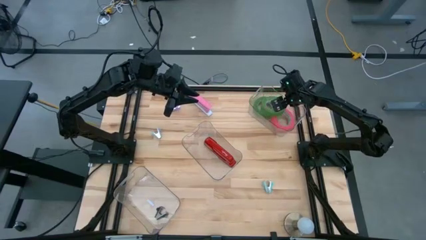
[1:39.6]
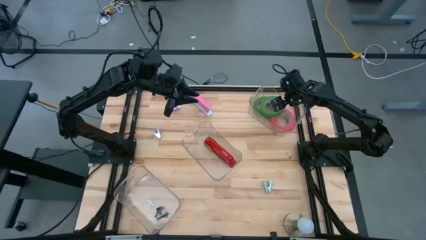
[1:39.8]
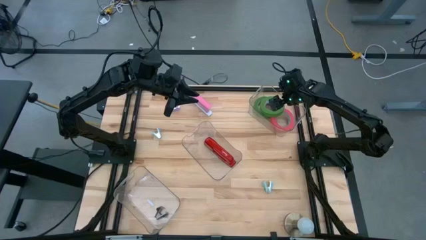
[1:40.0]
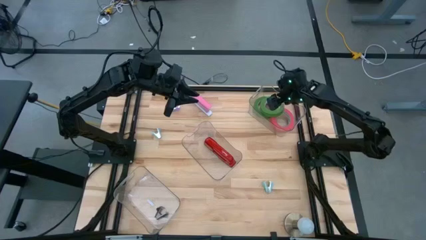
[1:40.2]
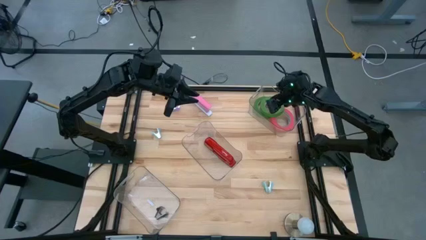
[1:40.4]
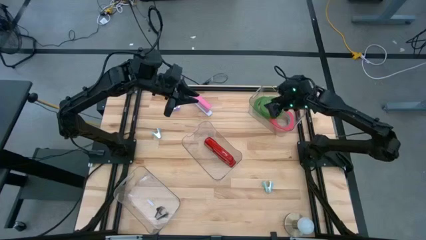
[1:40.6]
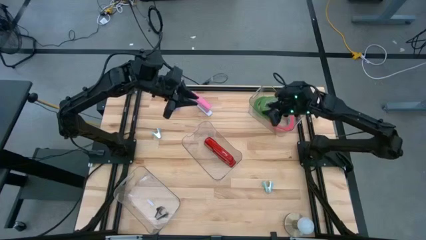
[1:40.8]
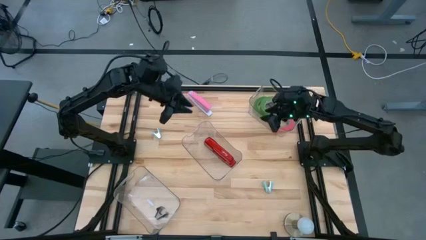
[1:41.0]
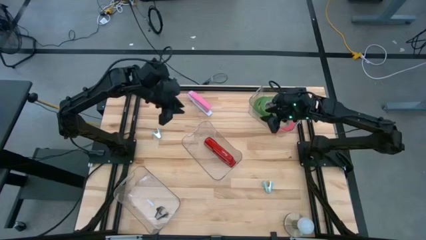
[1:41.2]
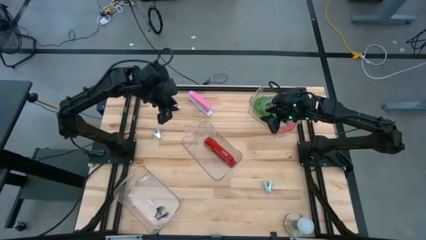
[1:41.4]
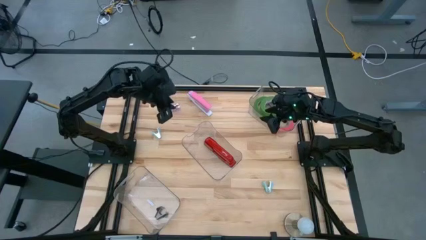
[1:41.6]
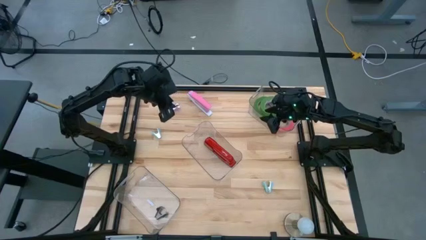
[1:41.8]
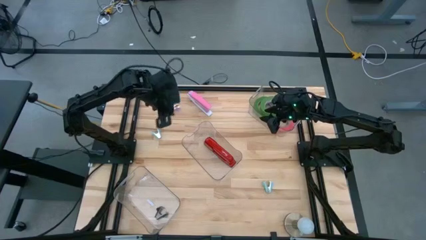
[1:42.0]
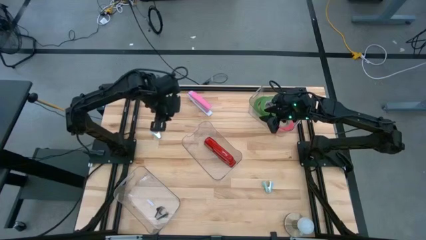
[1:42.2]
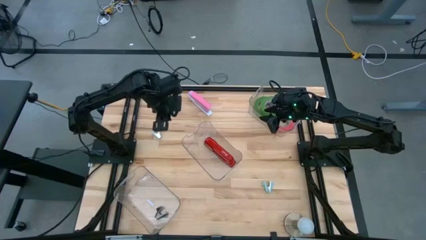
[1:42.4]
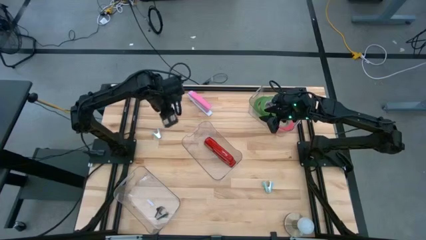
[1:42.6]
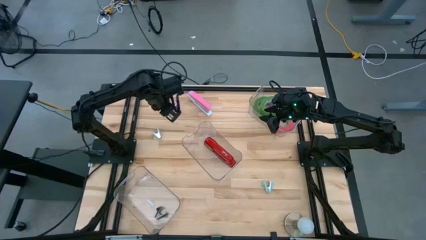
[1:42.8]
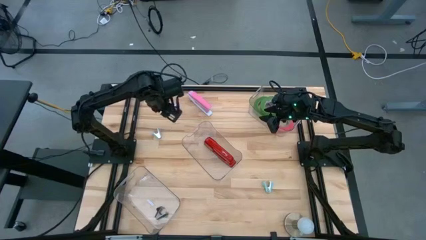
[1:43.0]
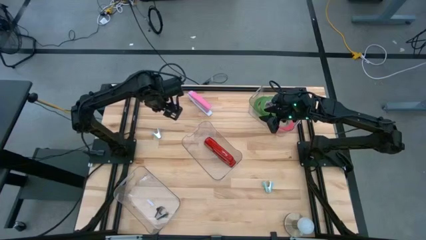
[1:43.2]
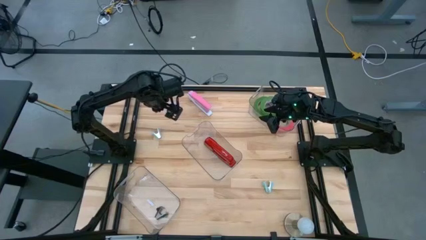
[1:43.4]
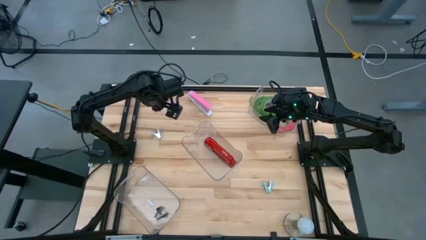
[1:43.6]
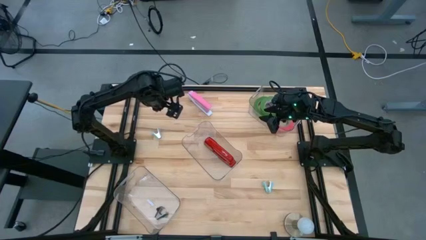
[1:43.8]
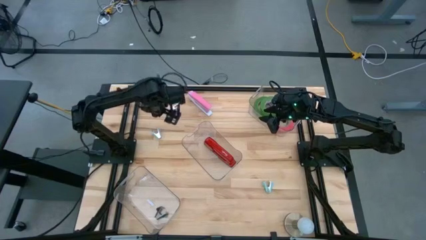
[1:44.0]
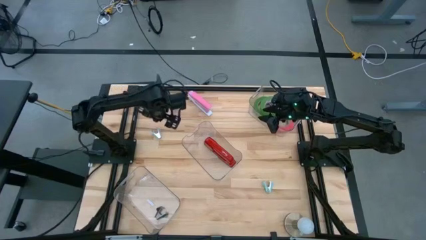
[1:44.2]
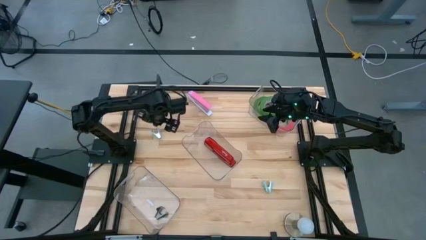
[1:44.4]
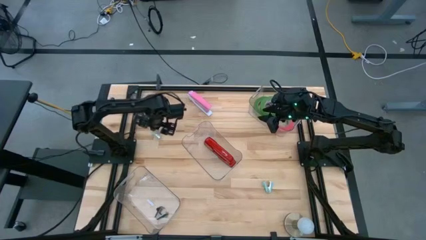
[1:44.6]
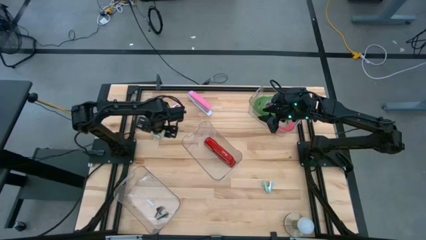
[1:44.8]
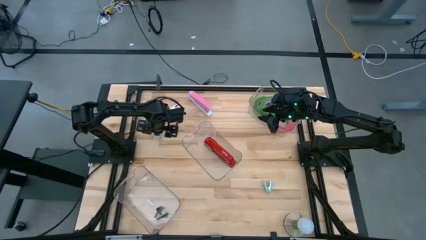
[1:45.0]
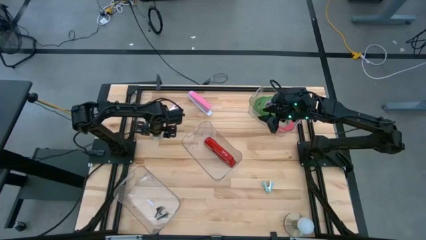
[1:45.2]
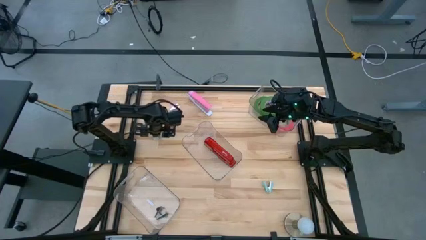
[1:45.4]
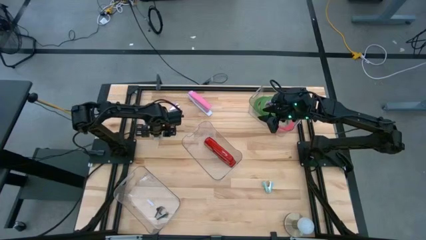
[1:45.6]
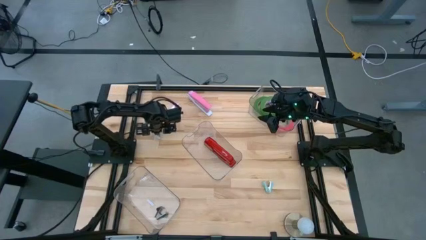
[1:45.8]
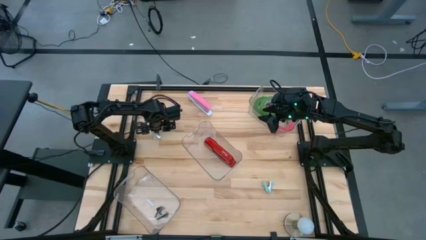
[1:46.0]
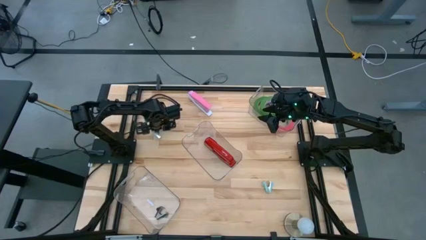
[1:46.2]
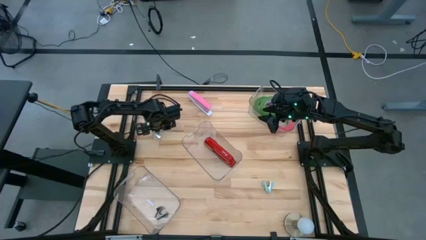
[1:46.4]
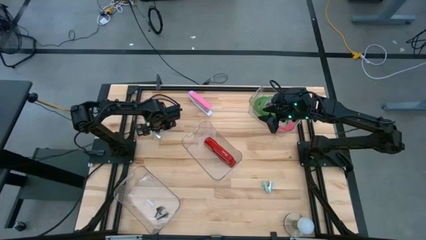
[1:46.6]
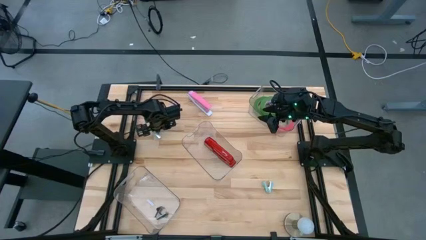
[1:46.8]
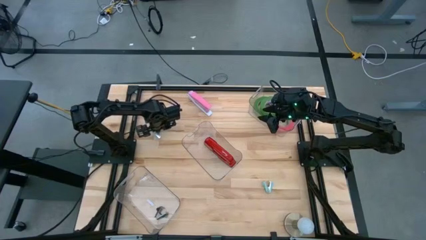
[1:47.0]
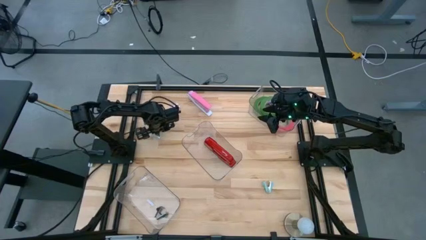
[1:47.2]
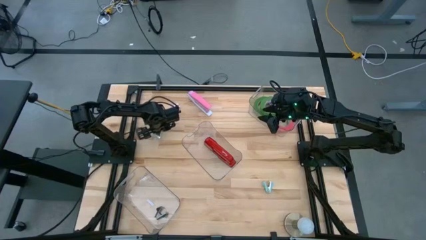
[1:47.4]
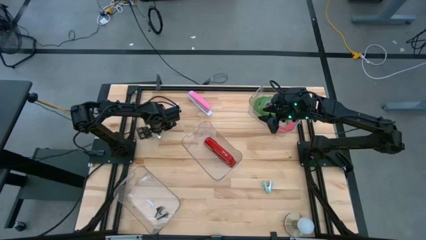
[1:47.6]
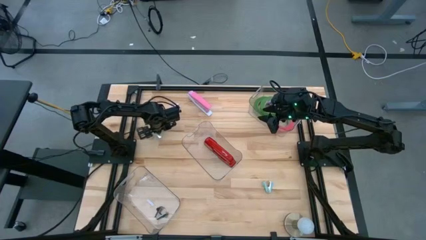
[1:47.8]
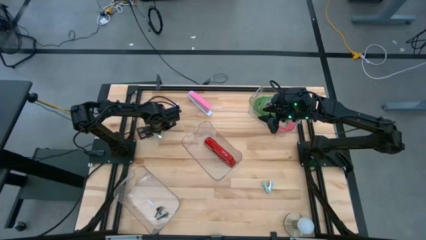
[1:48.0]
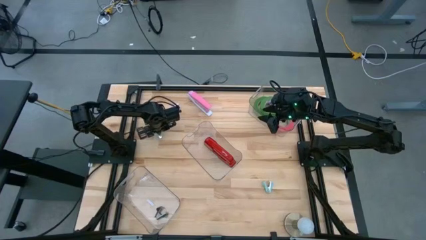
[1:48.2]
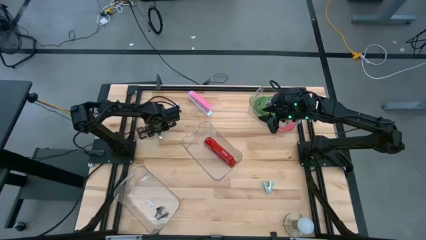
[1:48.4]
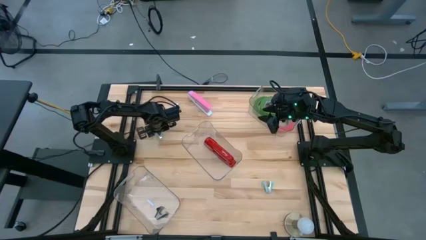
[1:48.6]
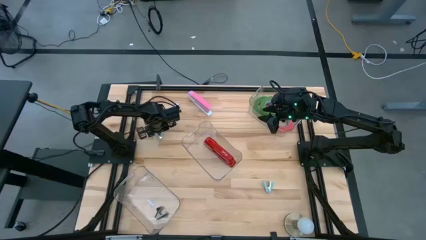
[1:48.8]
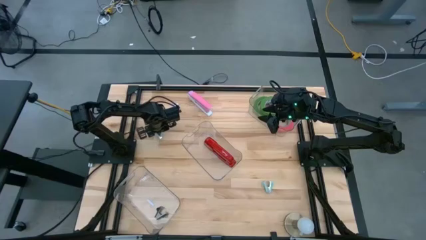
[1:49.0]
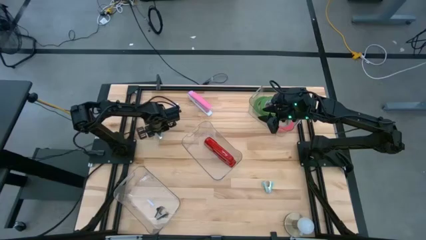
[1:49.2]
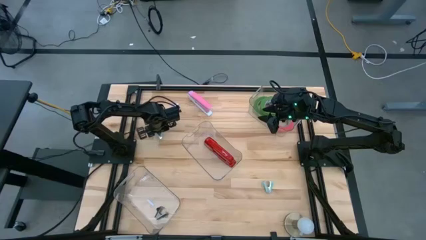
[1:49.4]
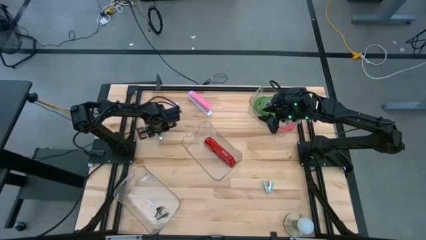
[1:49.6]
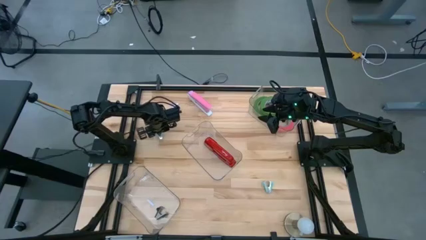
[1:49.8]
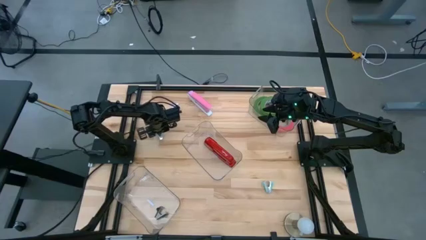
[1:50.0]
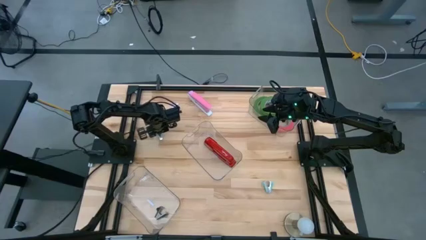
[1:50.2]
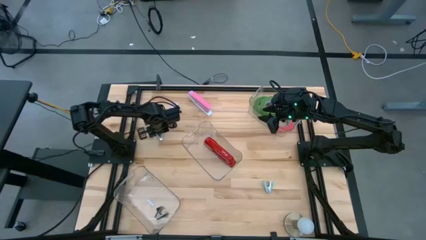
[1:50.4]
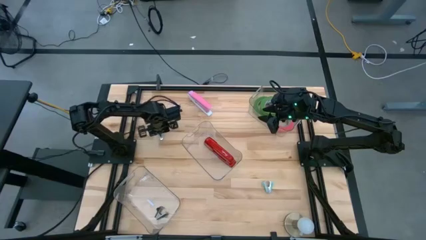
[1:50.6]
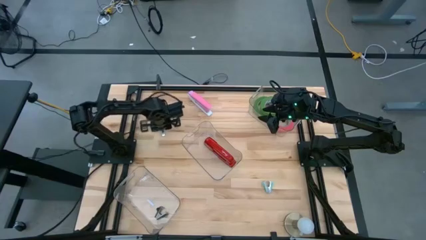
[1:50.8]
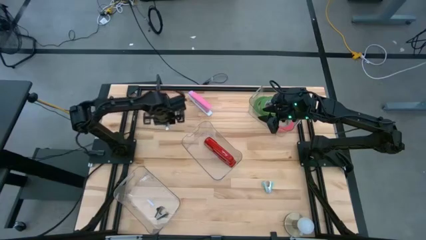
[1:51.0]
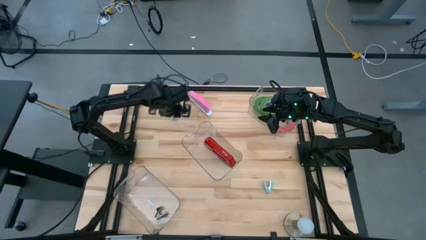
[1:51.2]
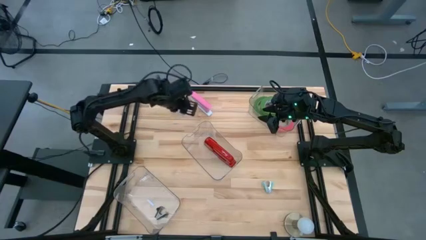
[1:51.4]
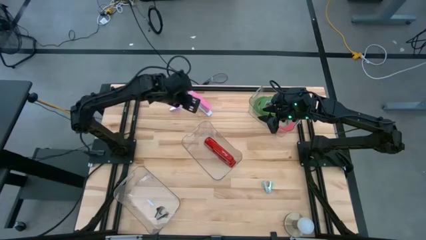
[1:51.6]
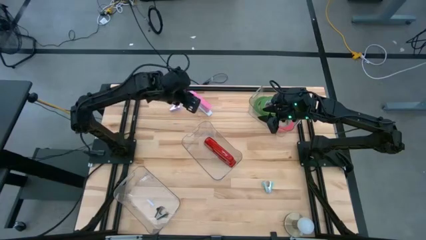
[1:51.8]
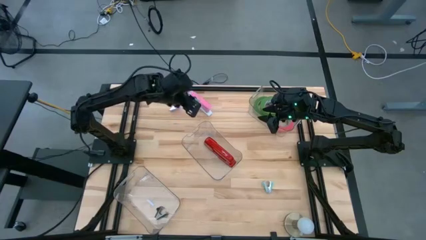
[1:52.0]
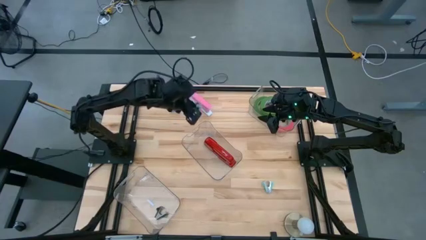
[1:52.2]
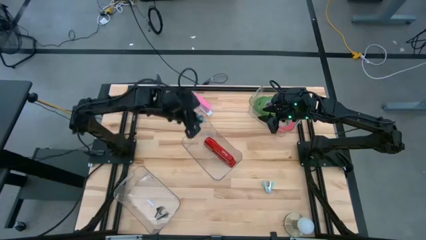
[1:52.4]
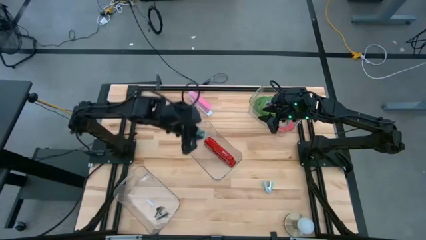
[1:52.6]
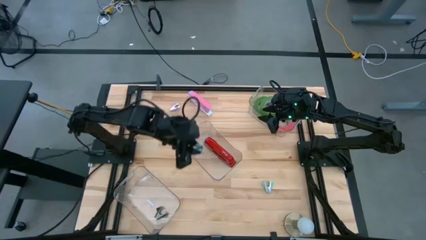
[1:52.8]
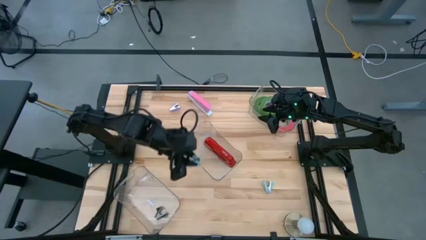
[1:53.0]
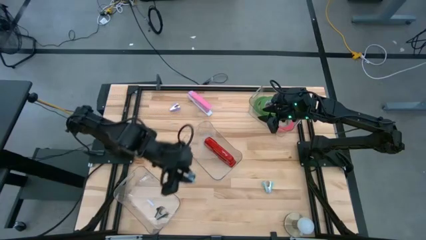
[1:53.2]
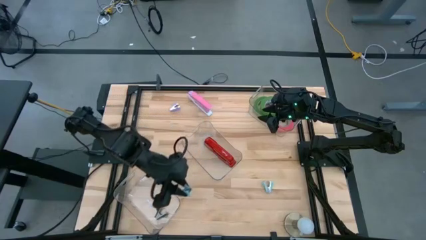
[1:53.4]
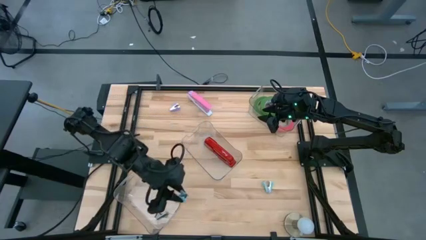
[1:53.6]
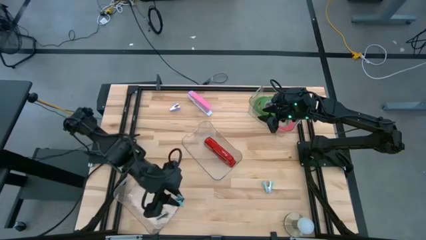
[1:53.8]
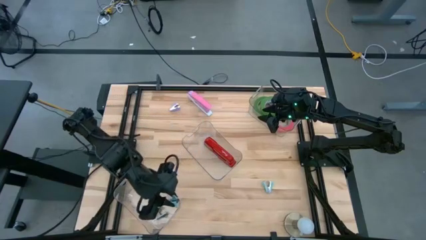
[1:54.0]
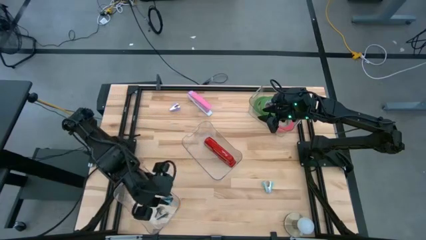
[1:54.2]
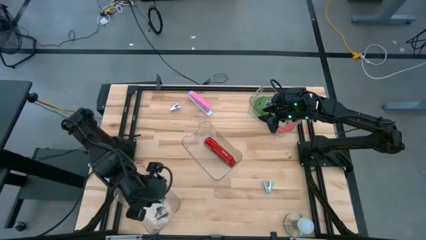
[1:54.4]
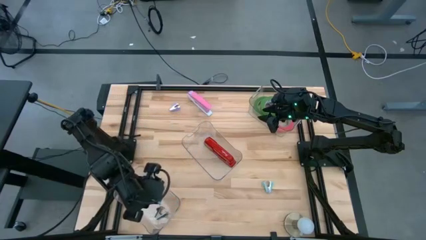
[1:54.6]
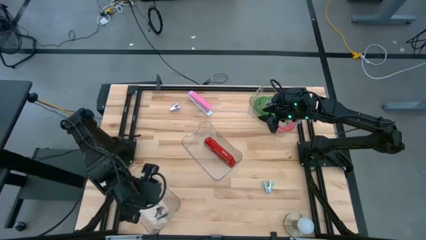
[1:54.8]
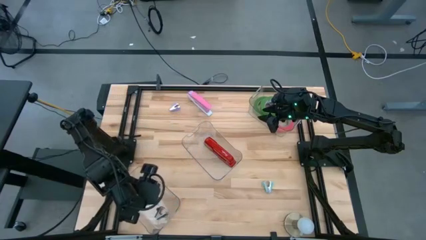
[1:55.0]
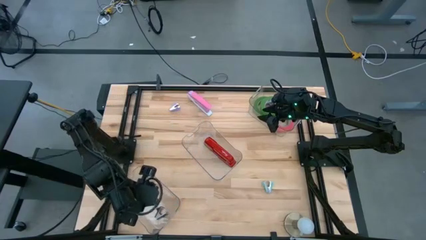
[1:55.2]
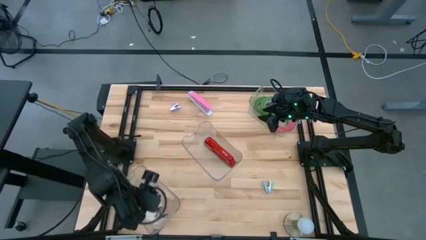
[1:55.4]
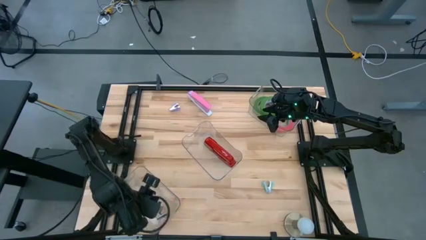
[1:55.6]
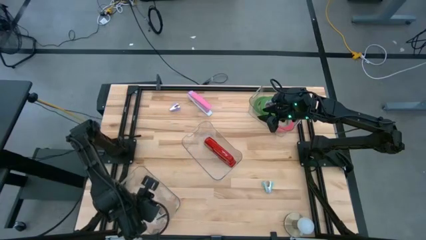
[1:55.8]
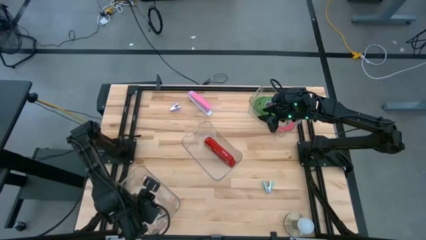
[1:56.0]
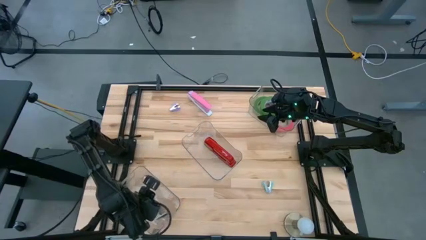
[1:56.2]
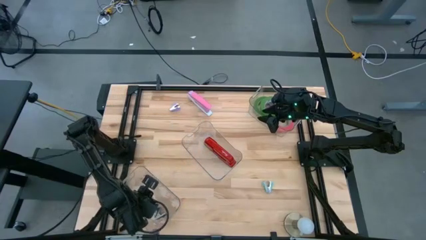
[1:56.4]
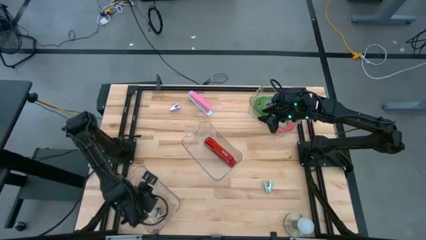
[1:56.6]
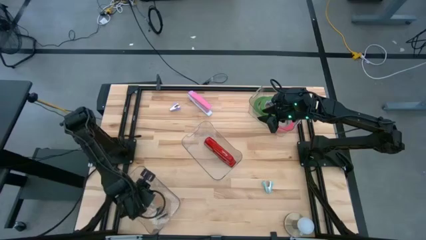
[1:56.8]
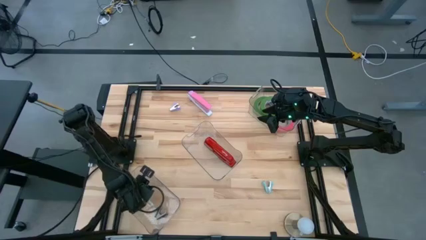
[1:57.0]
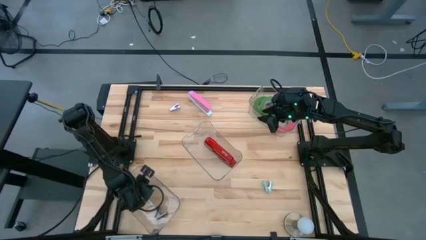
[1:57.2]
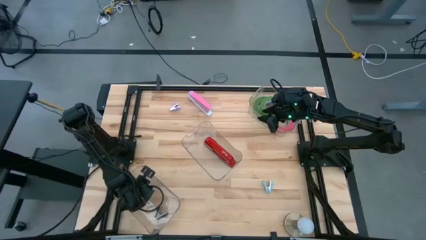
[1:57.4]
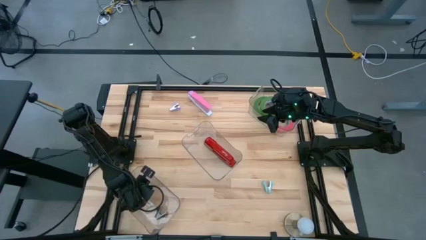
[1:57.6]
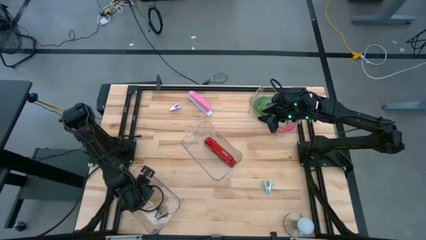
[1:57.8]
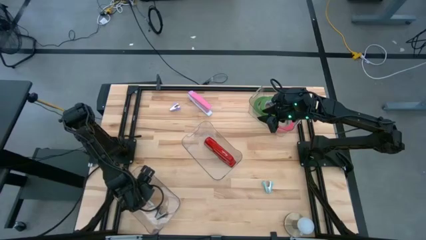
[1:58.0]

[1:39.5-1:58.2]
Task: Pick and place Stapler, Stapler remover, tape
Put the top blue staple remover into the bottom transparent bin
